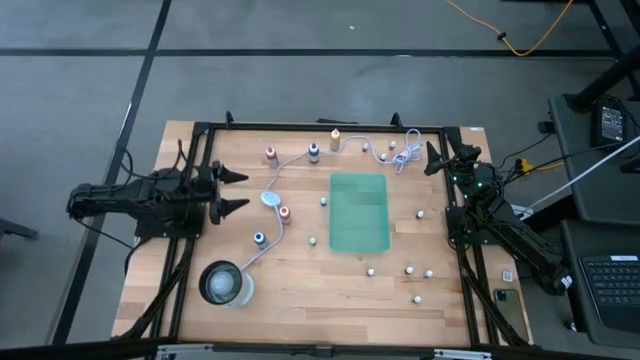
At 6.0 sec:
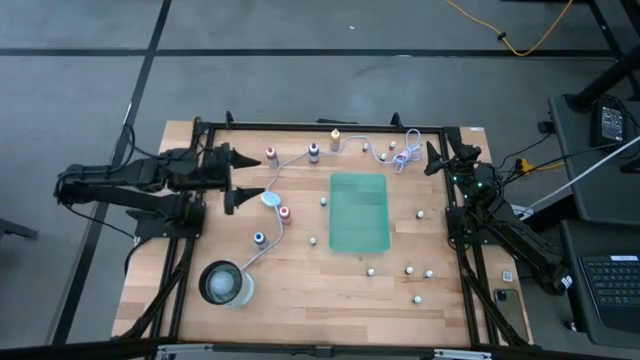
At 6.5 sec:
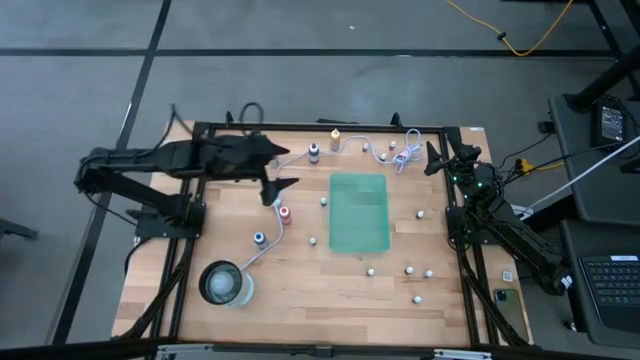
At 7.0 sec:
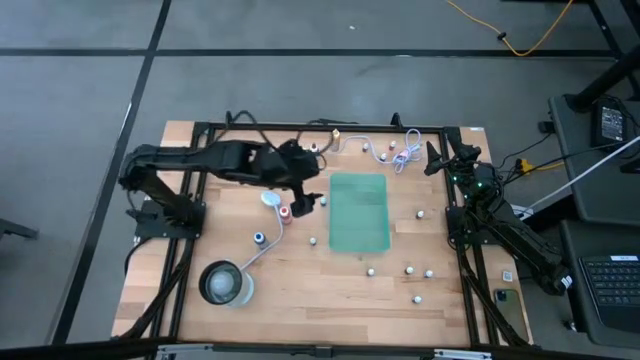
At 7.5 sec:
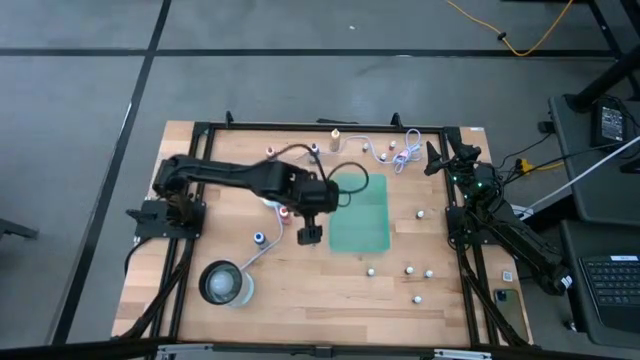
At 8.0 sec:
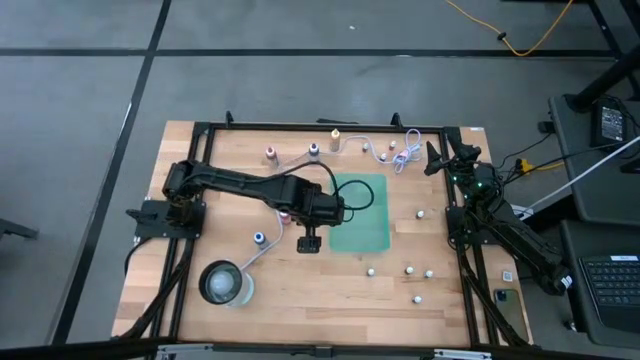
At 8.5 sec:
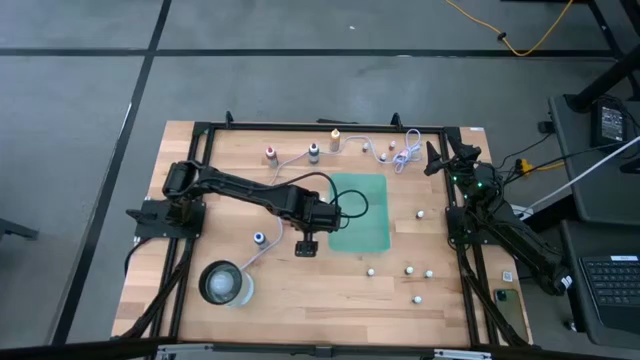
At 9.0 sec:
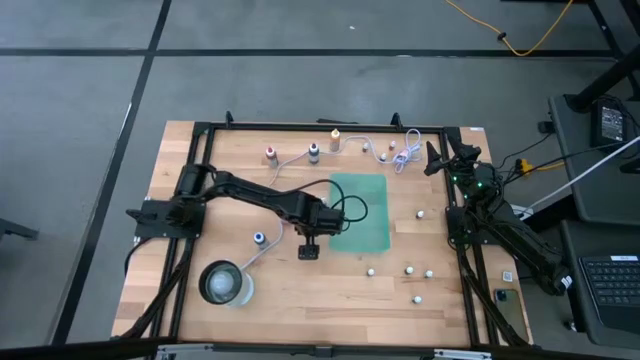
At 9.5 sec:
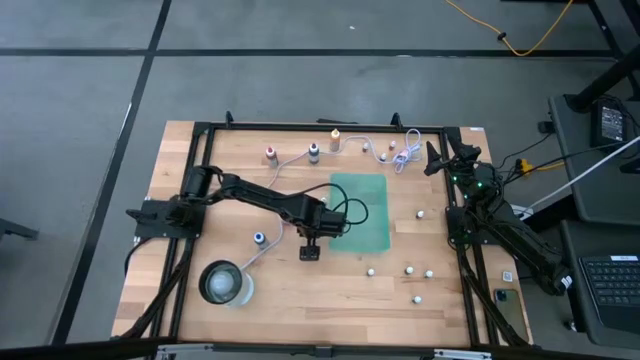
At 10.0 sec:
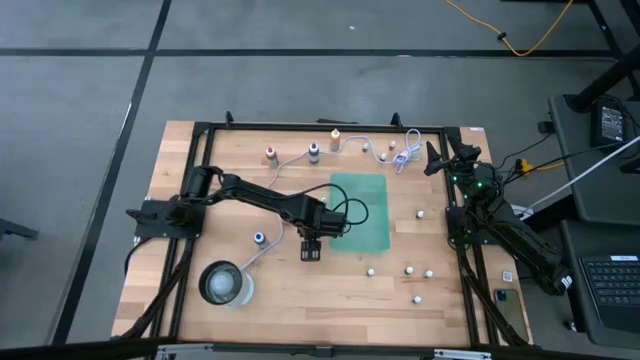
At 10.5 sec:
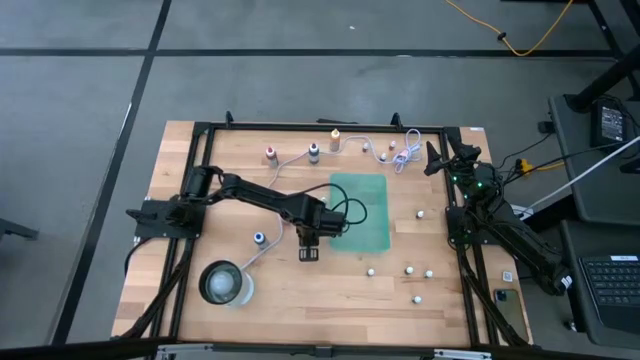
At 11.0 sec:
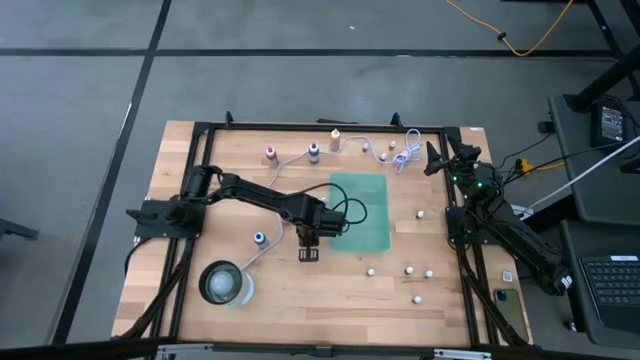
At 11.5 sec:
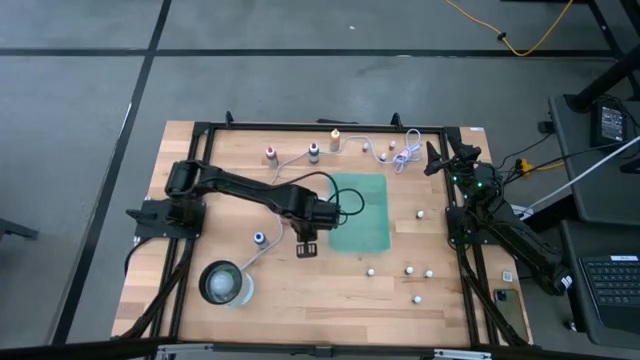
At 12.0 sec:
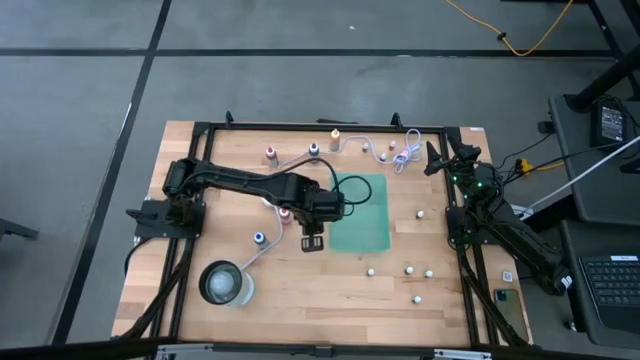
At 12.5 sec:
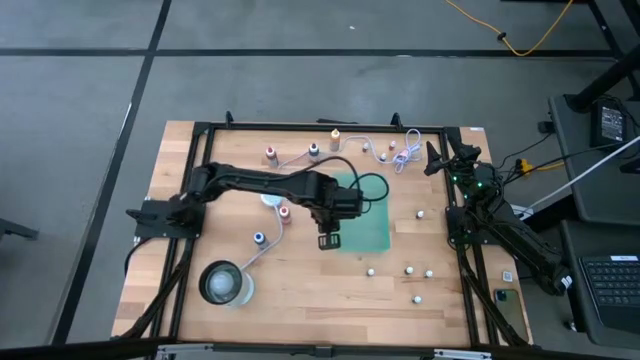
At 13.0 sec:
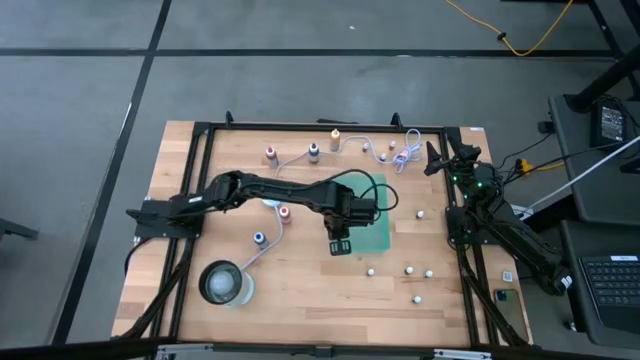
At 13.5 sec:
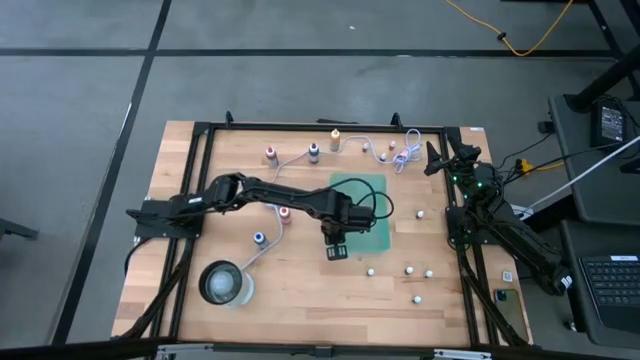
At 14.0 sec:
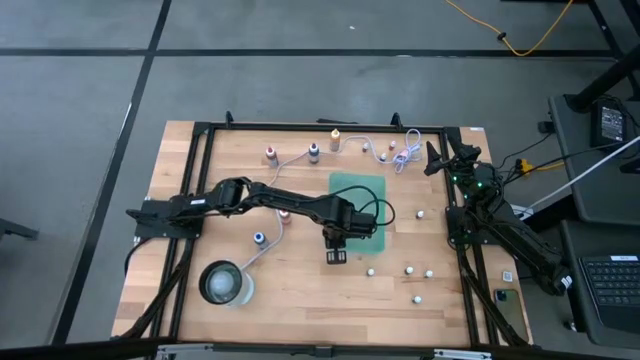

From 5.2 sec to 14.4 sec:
Task: Pick & Place food coloring
Put the small violet food coloring bottle into the green bin

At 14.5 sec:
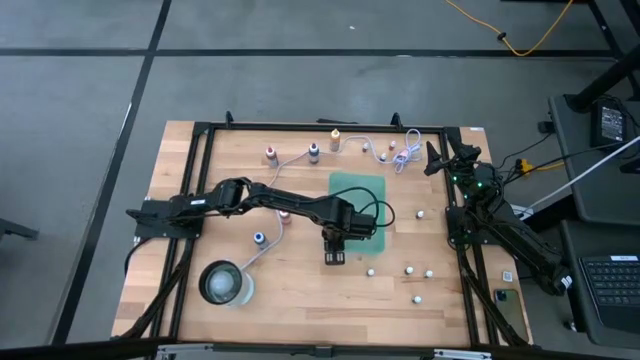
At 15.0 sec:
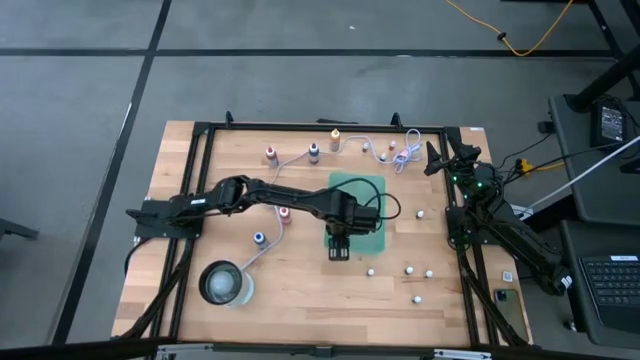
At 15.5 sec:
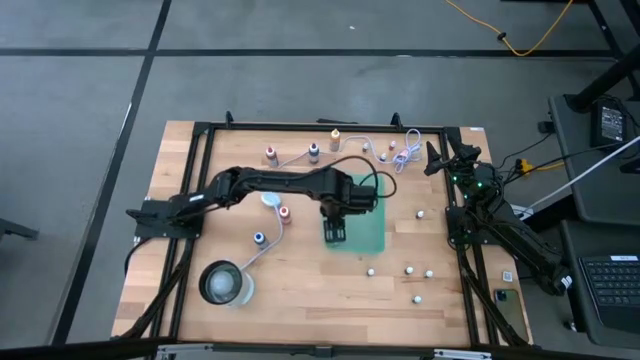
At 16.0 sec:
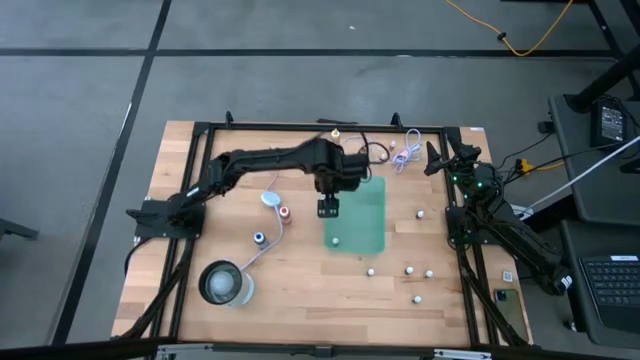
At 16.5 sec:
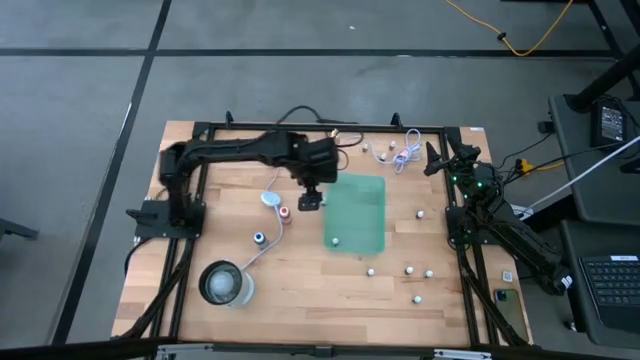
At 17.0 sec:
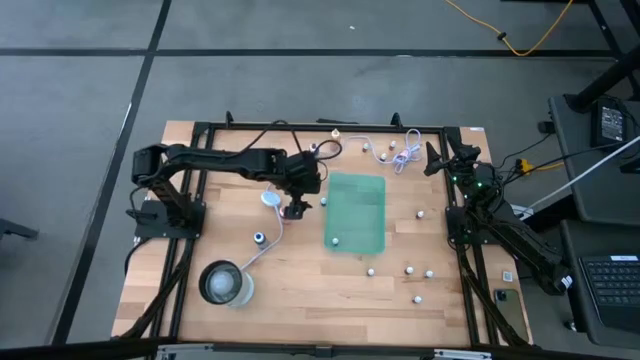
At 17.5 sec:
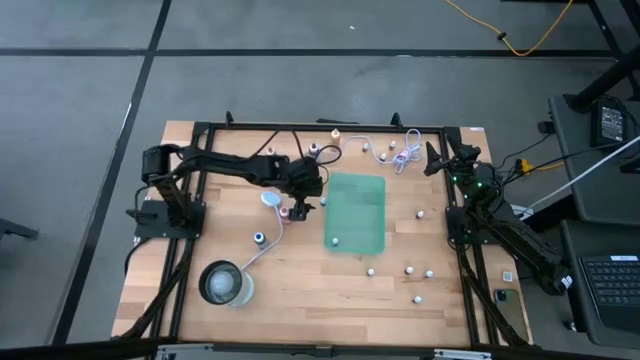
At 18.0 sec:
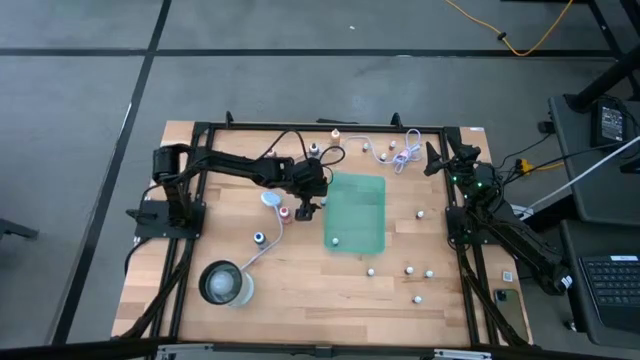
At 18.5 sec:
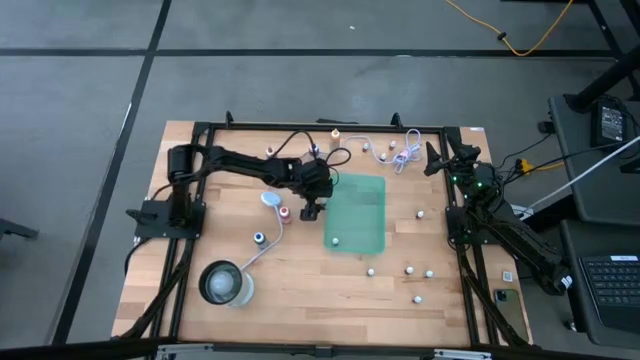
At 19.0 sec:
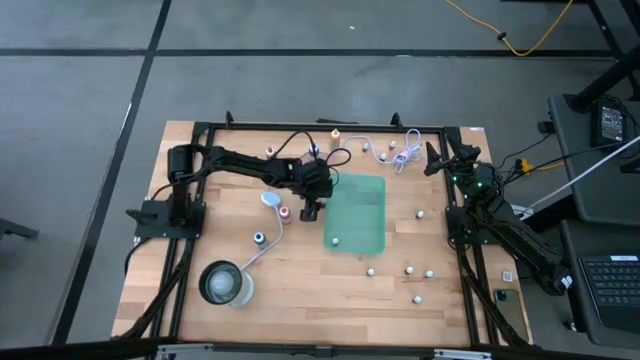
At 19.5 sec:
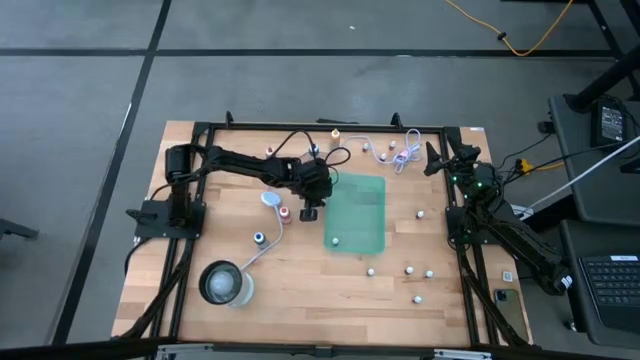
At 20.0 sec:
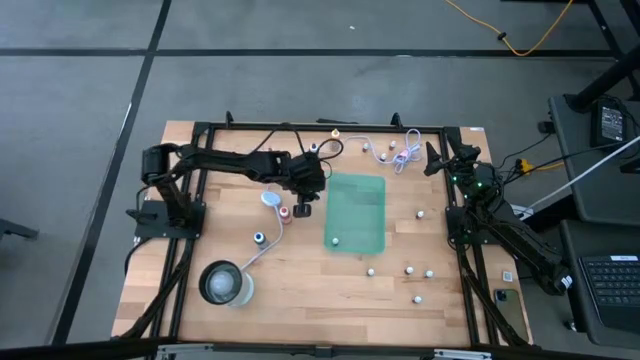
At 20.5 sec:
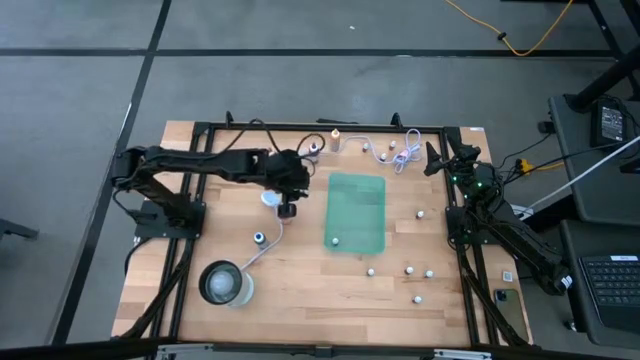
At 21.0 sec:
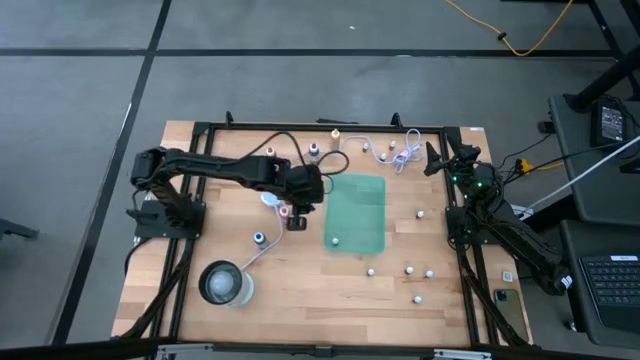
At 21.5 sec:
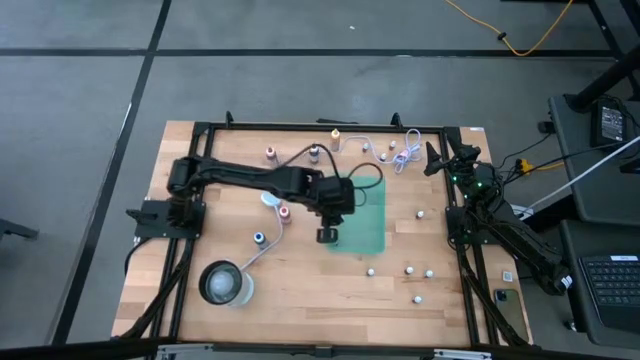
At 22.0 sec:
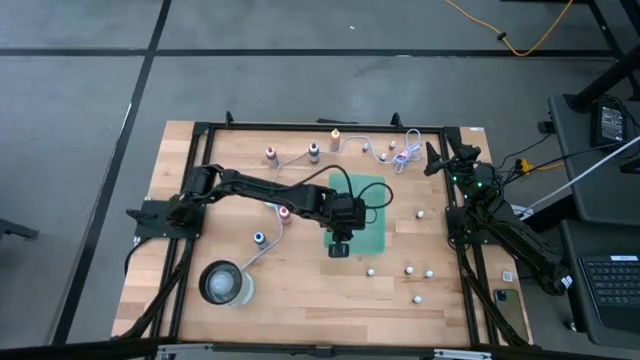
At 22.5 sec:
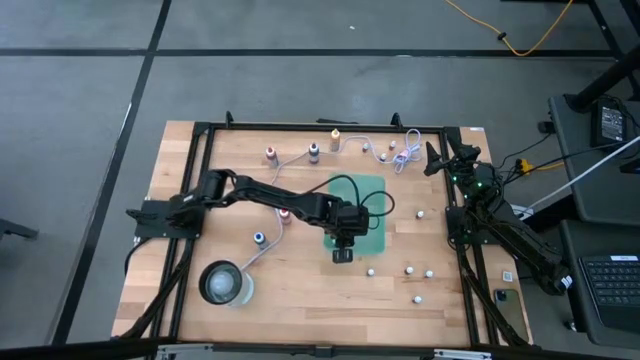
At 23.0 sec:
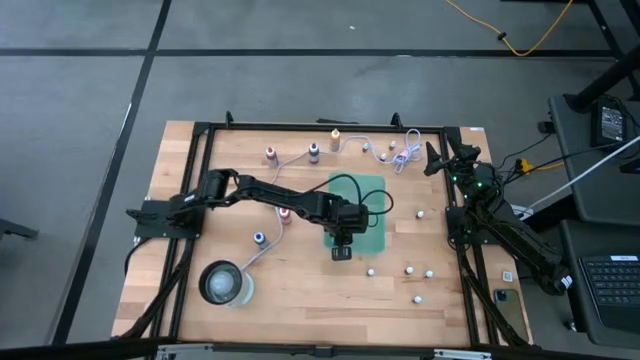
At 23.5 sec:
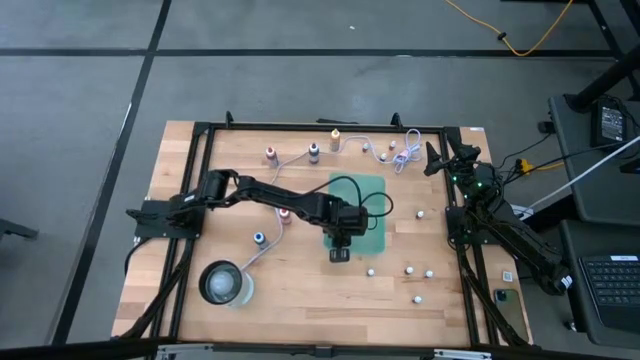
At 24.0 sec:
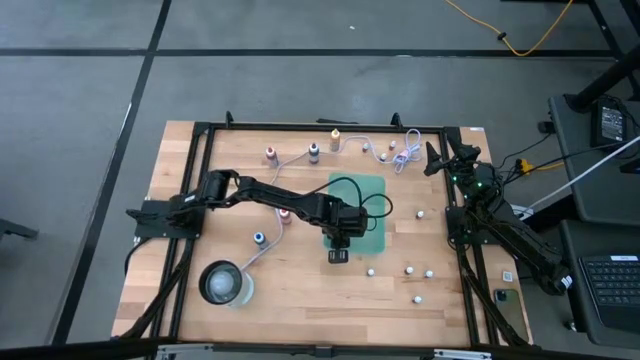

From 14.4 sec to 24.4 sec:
Put the small blue food coloring bottle into the green bin

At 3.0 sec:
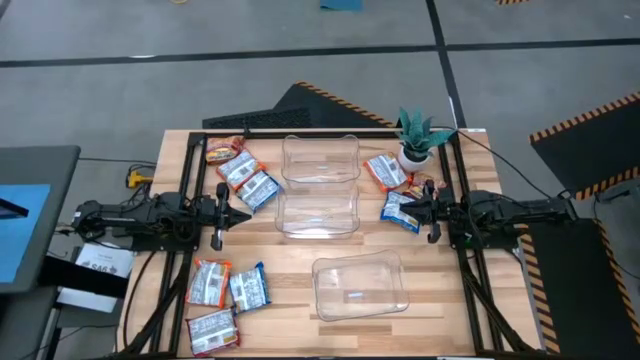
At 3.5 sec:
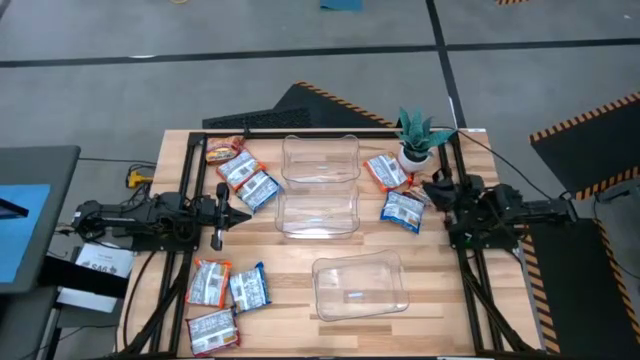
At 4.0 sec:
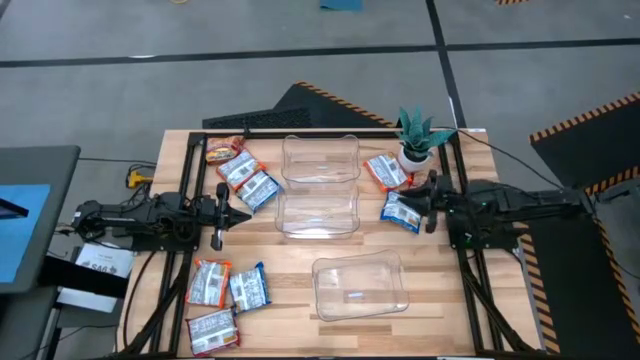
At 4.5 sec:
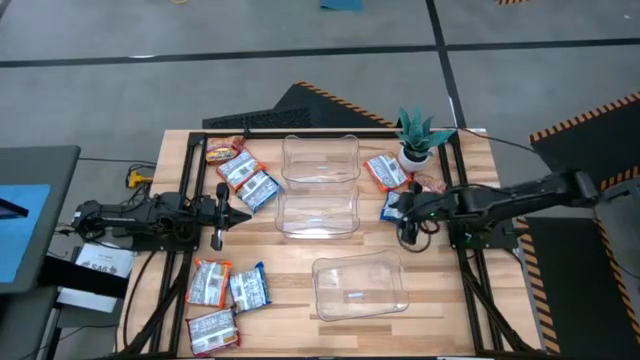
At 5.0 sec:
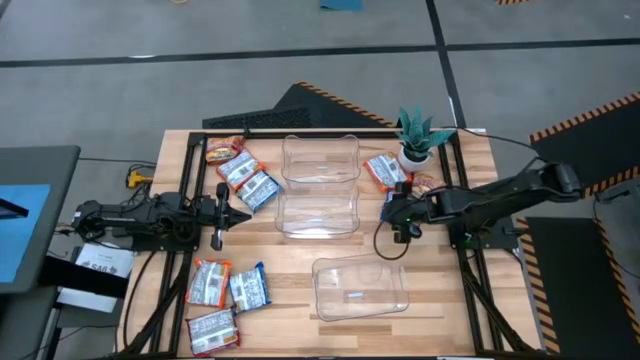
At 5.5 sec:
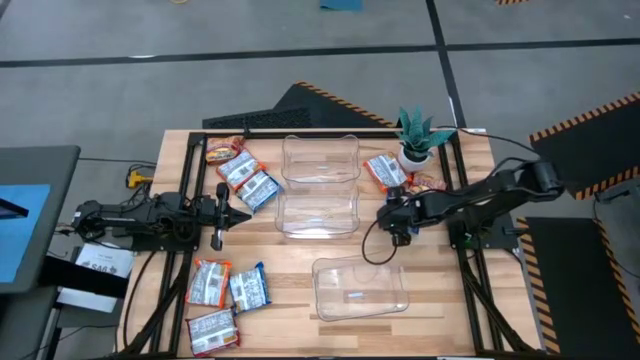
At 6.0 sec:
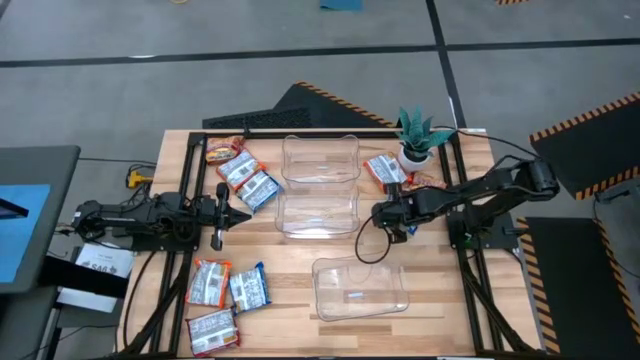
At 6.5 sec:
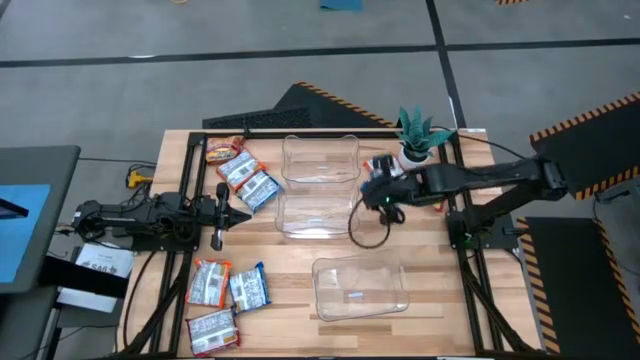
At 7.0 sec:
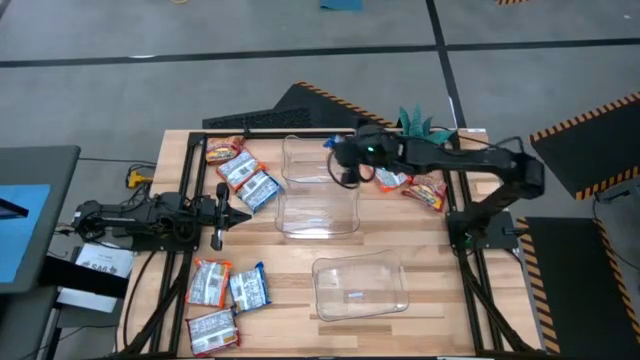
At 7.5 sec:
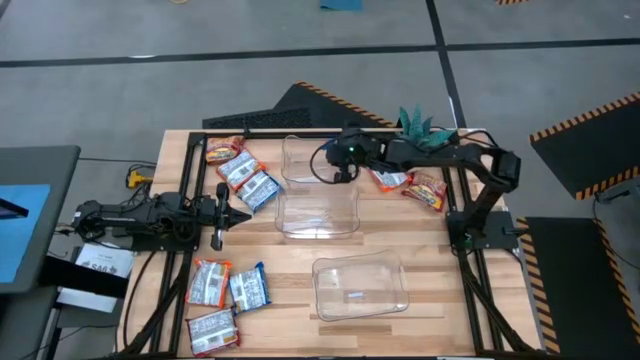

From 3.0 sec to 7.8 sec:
Task: Sort Maruchan noodles
Put the top right blue noodle pack into the top transparent bin
